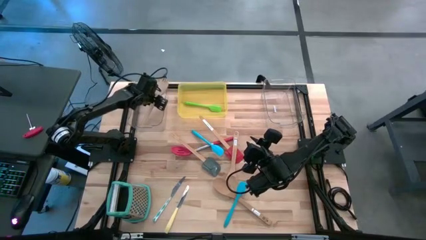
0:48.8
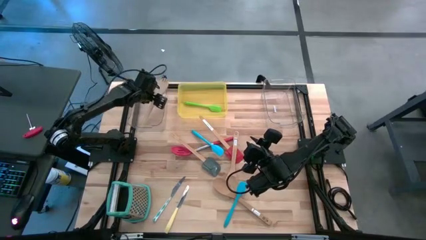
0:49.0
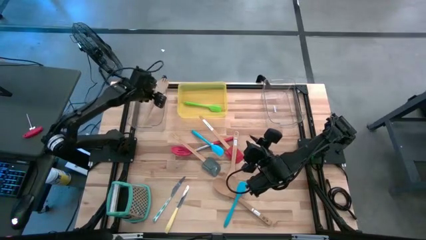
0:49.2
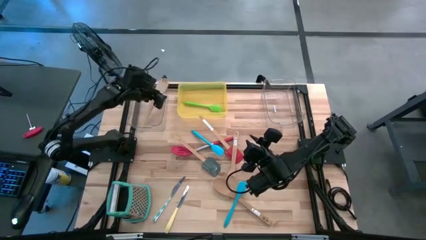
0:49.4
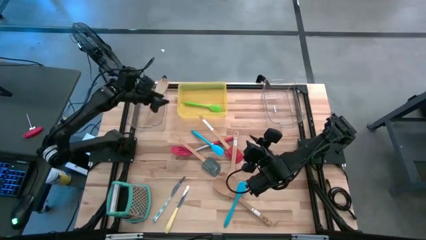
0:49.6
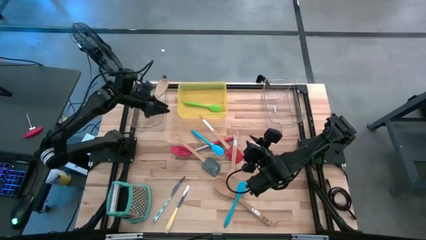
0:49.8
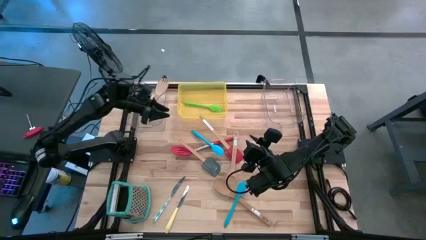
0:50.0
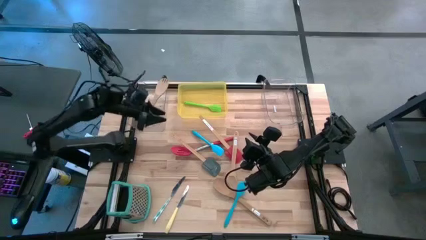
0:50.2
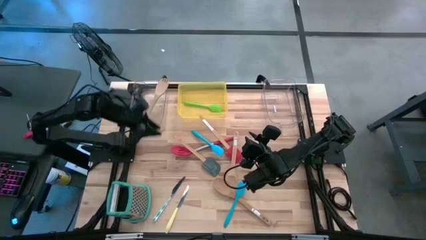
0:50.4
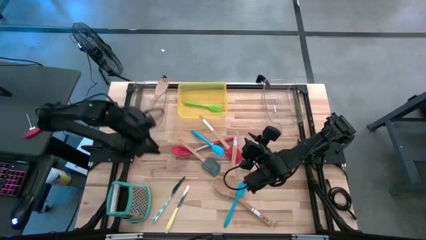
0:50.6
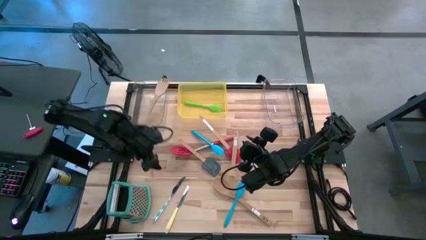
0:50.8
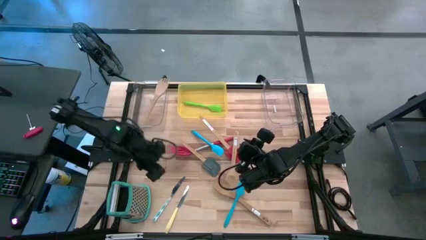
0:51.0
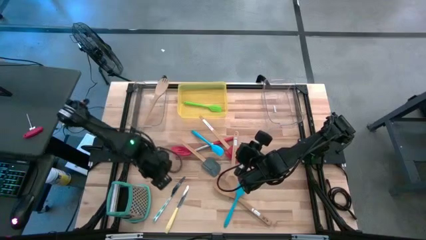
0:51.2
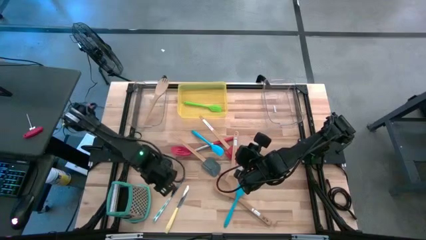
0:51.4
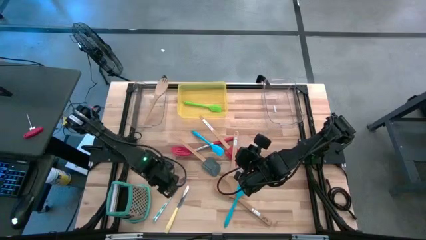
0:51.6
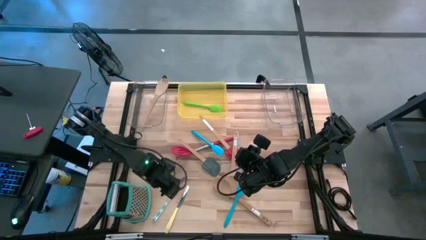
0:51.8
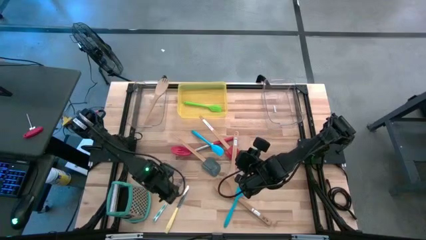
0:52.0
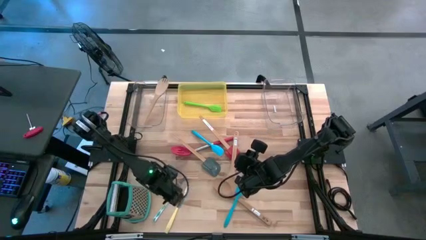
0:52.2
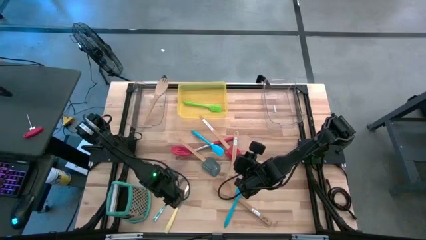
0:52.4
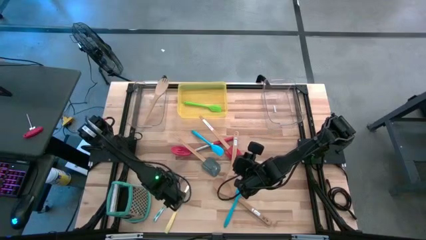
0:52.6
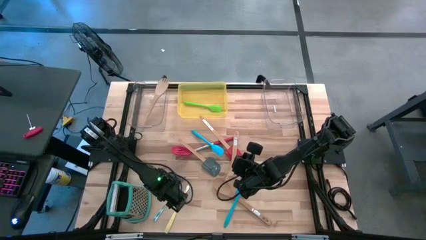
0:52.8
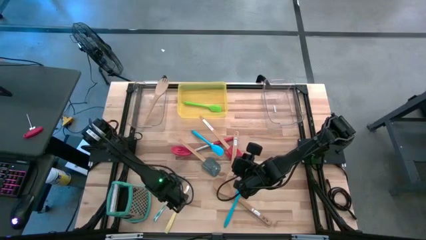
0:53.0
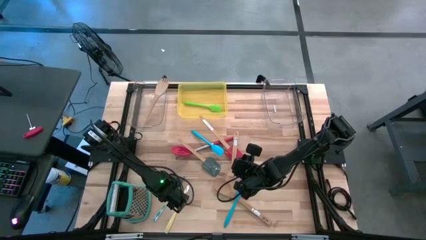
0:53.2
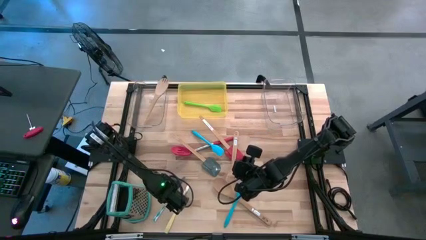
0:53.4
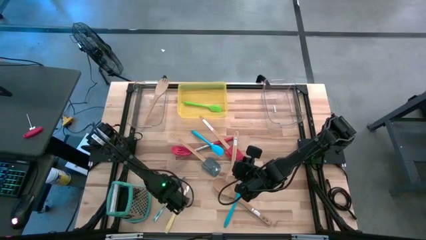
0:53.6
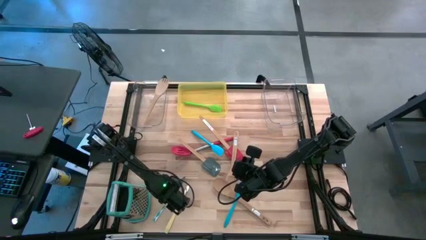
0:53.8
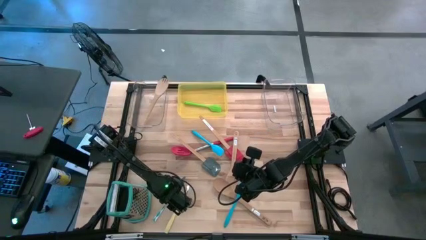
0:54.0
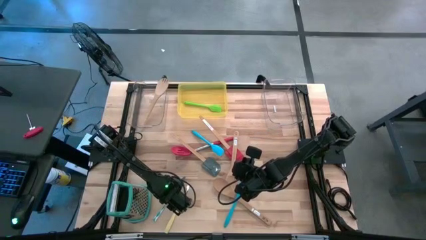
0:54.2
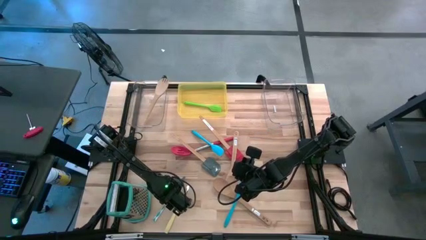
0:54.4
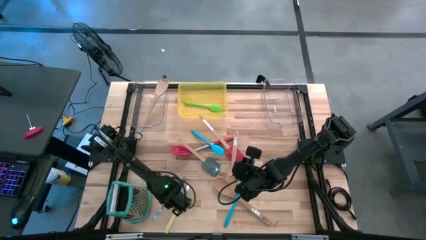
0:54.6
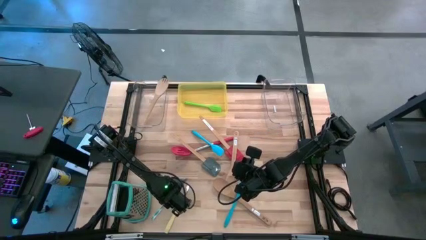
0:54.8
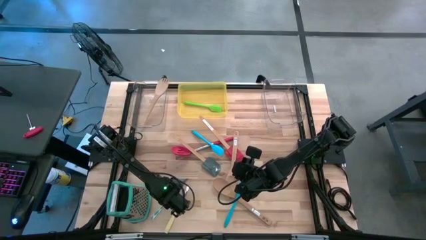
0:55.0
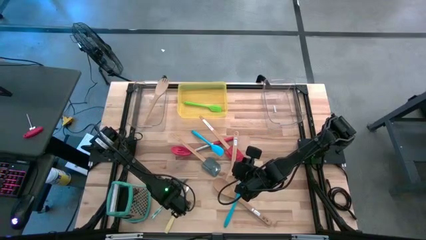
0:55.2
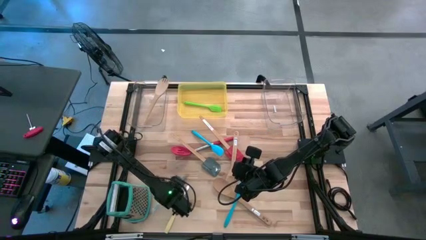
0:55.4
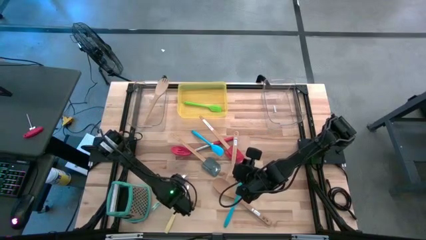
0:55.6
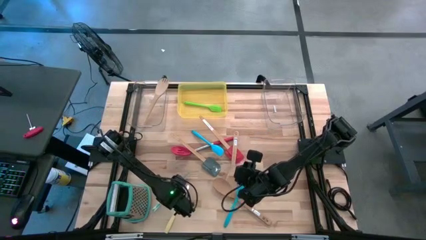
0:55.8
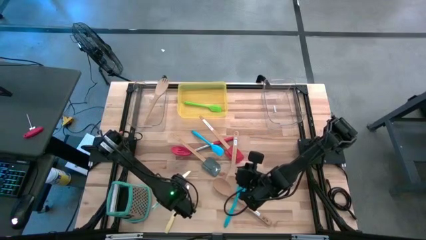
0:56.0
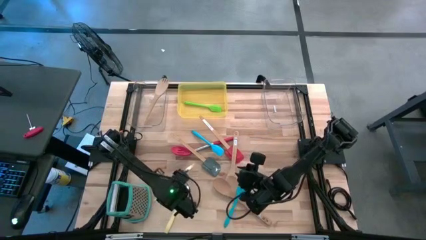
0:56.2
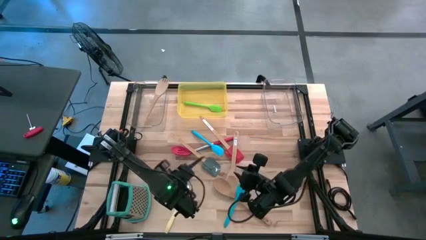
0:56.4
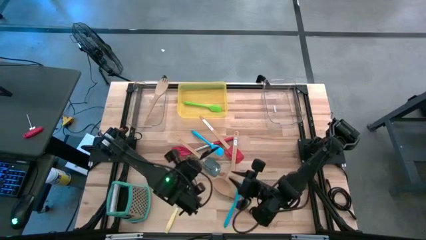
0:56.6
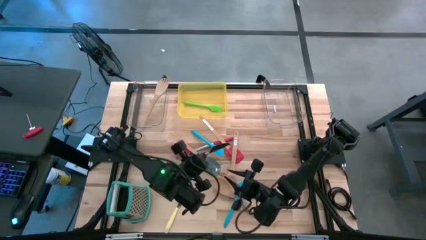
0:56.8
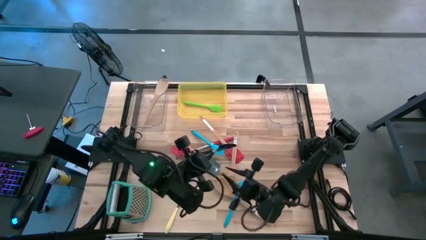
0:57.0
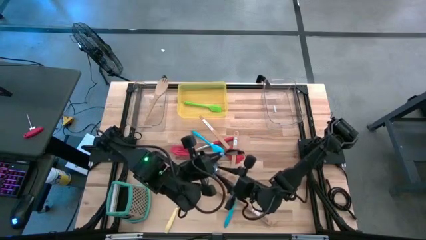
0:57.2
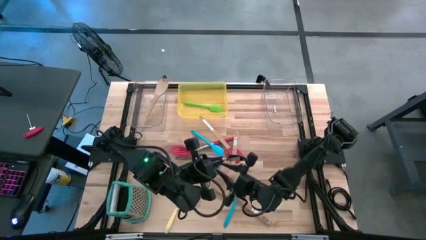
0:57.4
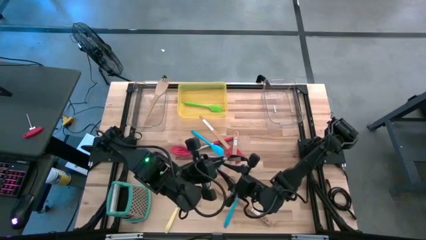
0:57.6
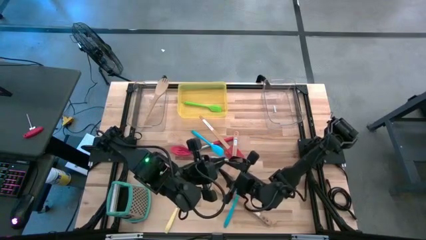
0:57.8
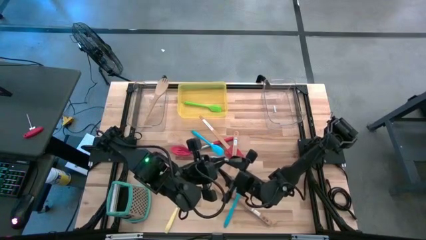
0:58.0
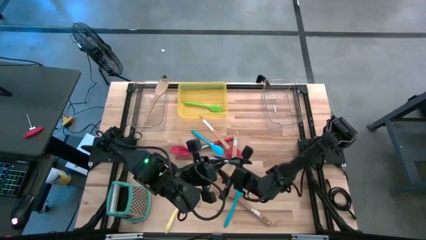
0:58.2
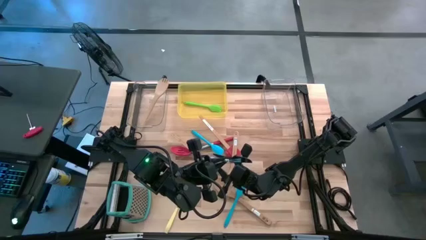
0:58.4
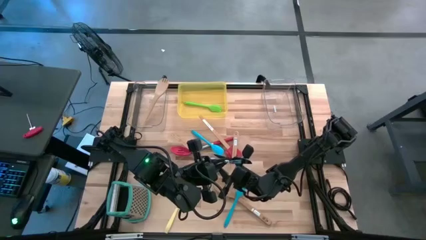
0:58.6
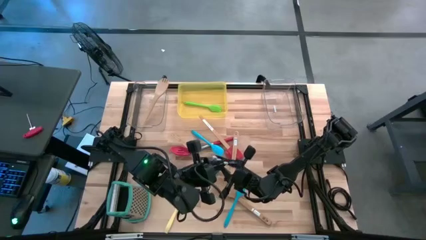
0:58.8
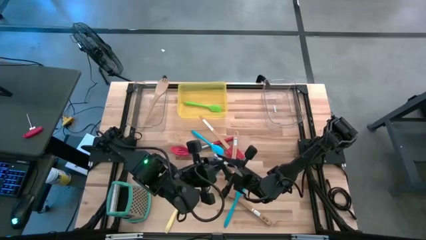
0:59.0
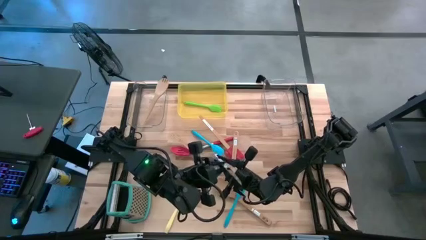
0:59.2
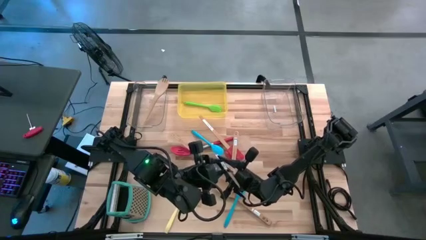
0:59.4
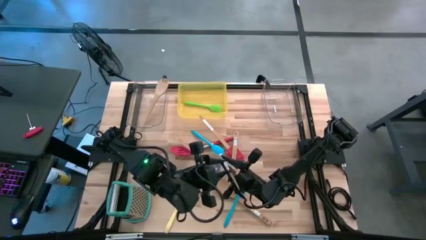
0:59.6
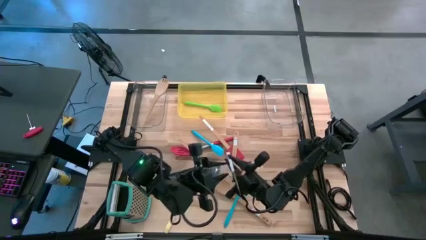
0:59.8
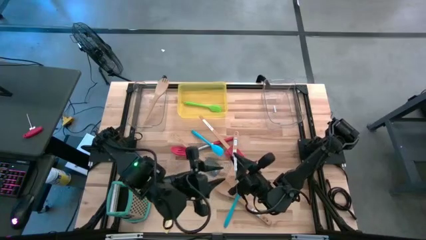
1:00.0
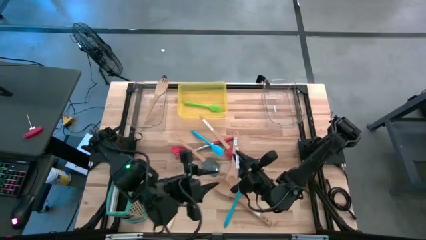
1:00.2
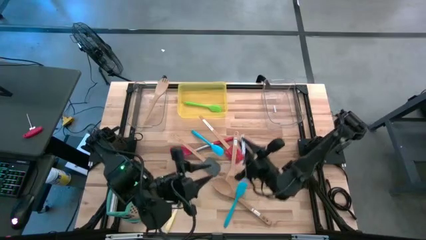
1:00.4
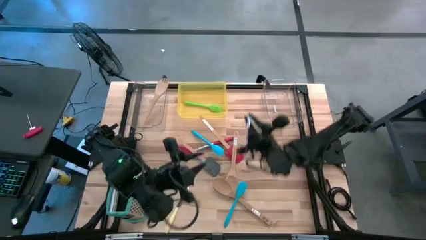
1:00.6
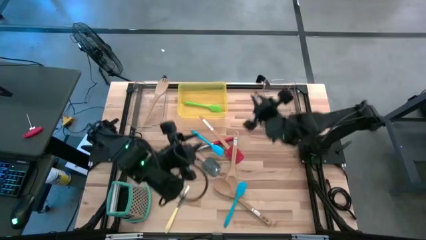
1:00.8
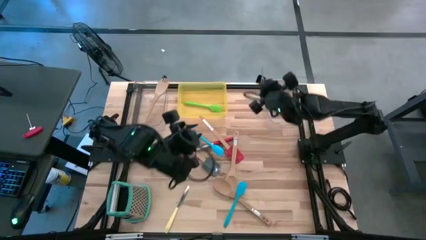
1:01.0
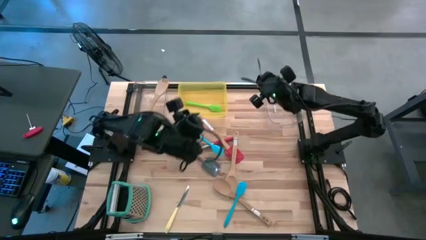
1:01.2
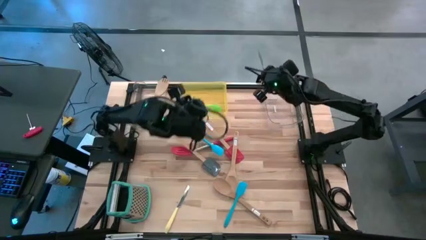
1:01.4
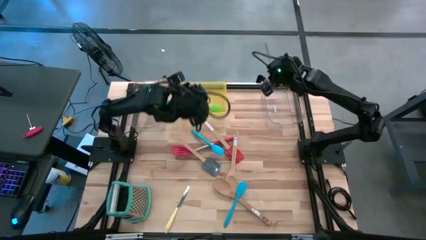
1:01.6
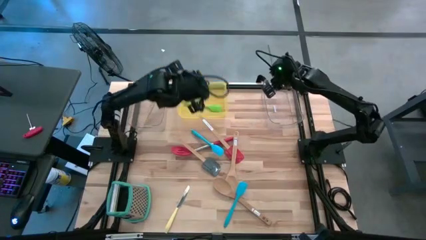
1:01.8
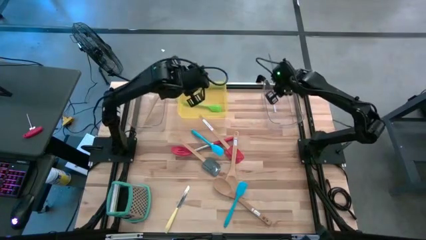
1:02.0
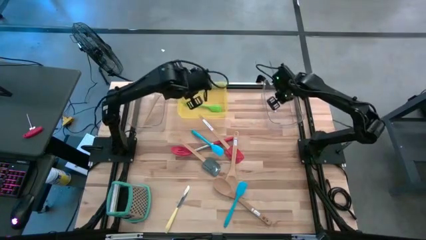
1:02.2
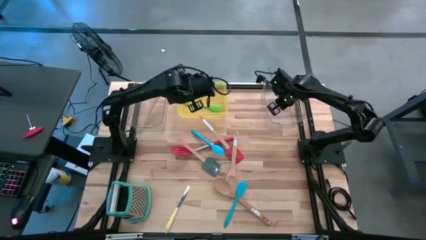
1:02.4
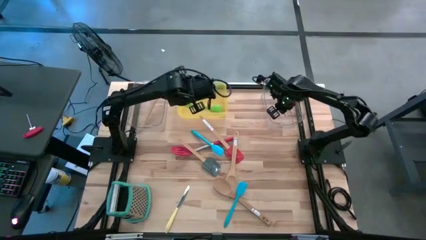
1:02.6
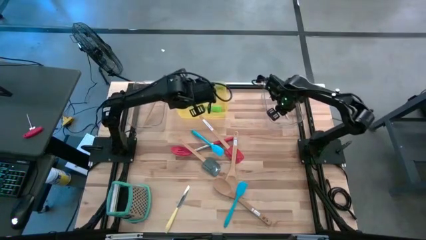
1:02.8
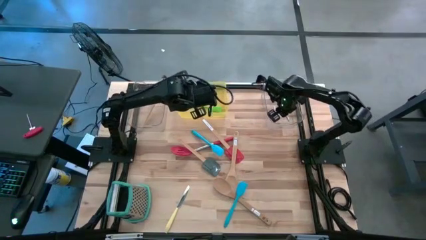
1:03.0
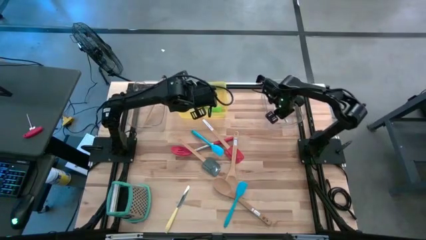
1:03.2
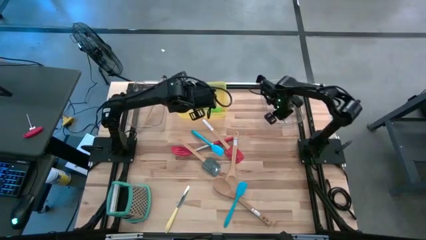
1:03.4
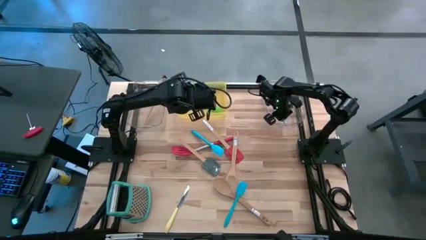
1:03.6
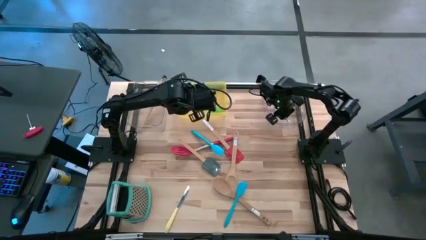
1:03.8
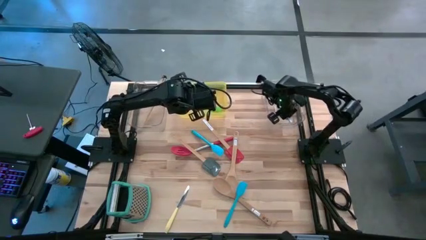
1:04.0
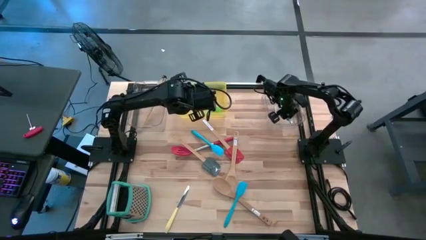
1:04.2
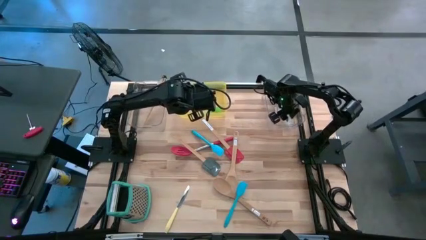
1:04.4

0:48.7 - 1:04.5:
Task: Pick & Place Kitchen Items
Put the blue table knife into the right transparent bin
